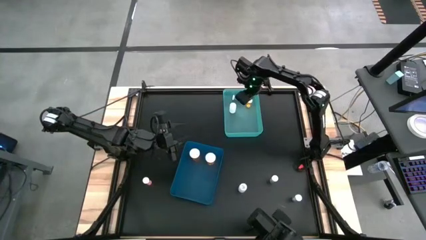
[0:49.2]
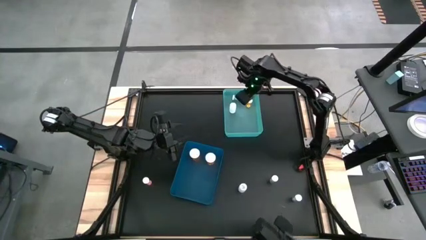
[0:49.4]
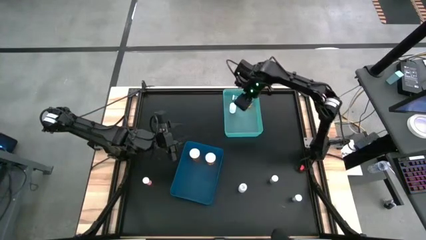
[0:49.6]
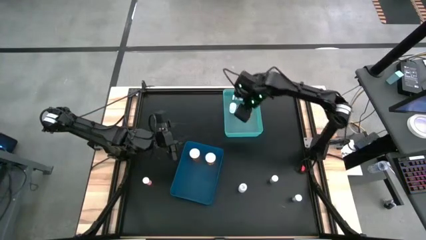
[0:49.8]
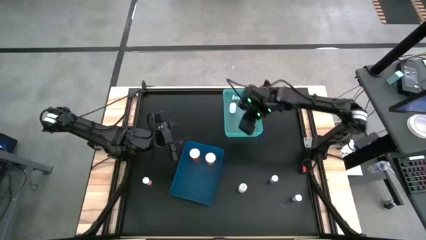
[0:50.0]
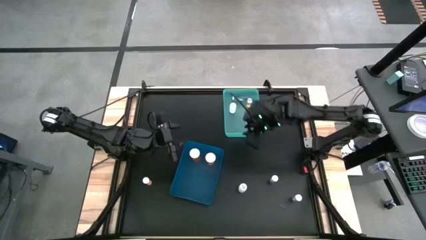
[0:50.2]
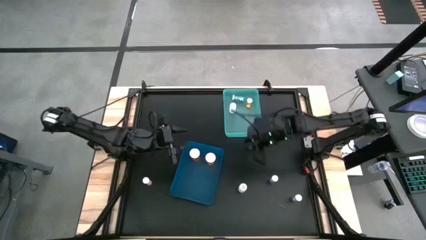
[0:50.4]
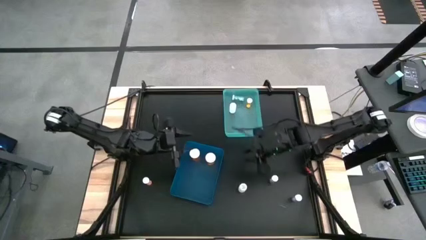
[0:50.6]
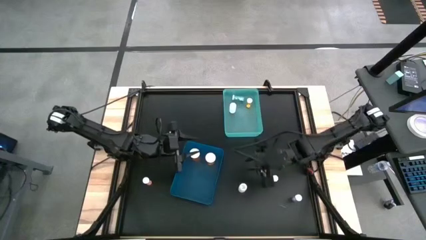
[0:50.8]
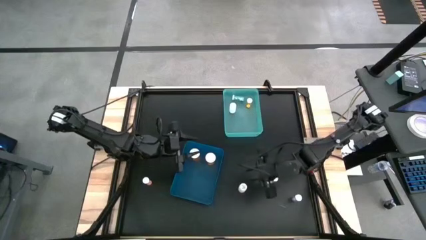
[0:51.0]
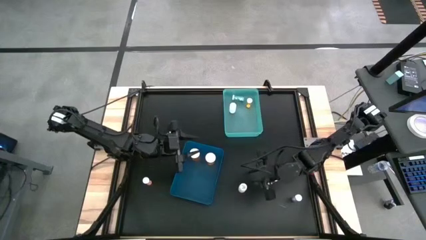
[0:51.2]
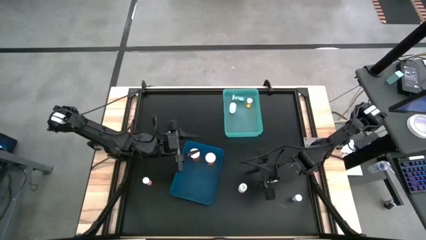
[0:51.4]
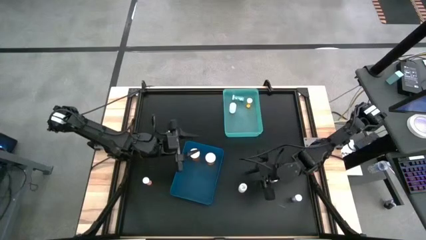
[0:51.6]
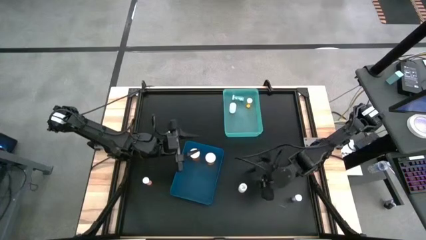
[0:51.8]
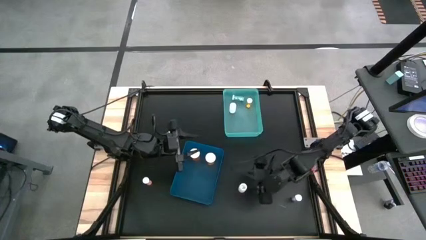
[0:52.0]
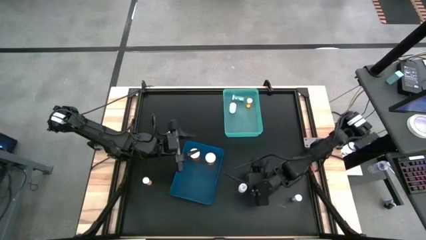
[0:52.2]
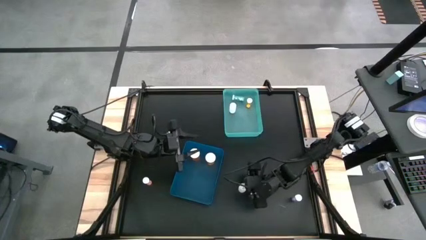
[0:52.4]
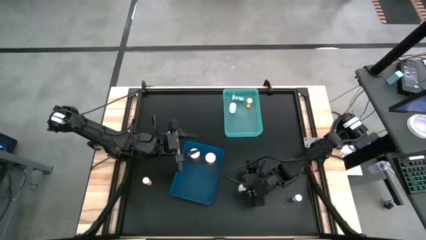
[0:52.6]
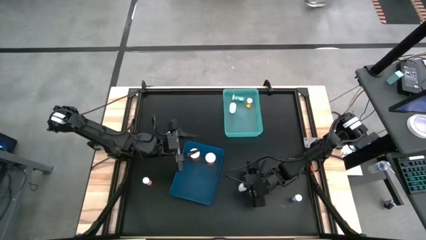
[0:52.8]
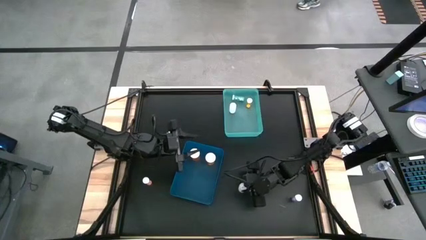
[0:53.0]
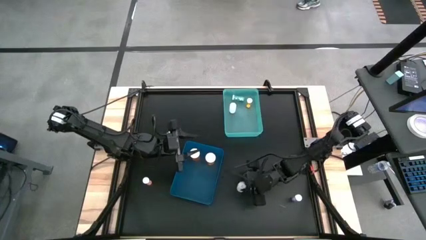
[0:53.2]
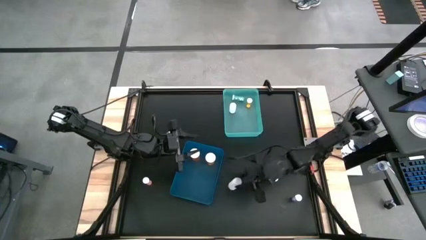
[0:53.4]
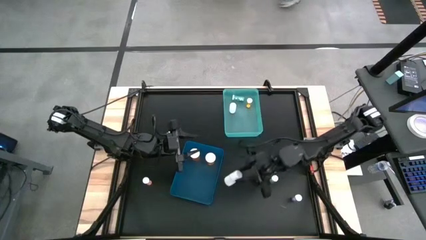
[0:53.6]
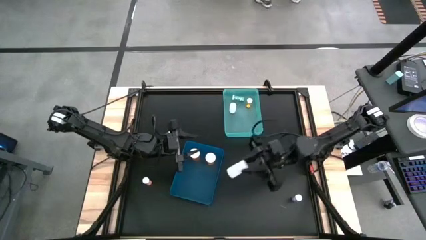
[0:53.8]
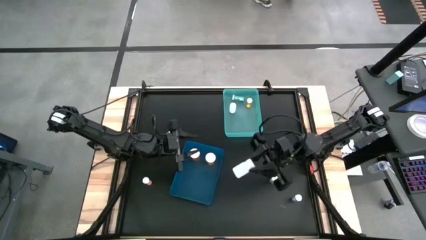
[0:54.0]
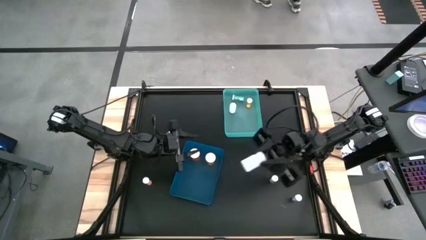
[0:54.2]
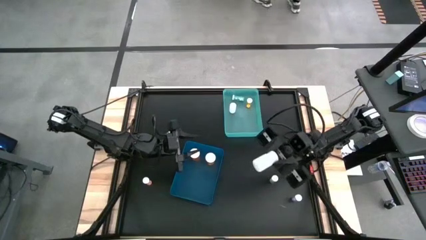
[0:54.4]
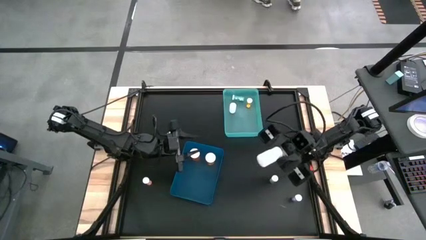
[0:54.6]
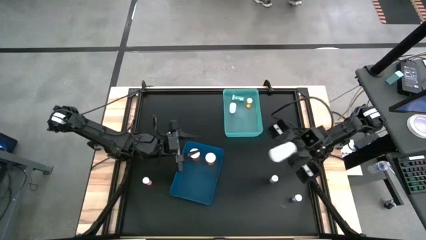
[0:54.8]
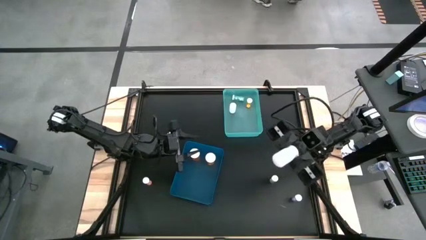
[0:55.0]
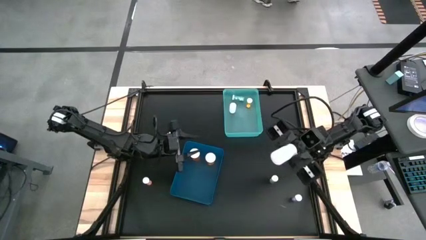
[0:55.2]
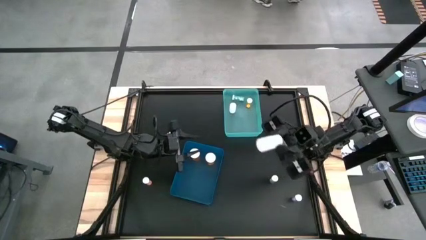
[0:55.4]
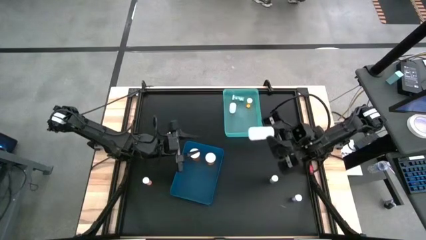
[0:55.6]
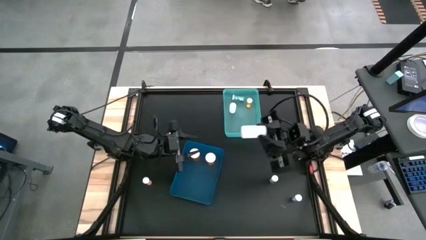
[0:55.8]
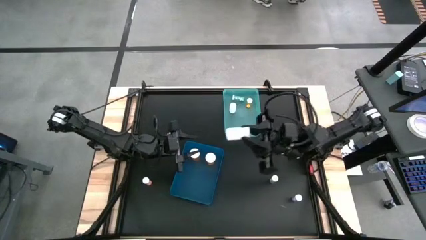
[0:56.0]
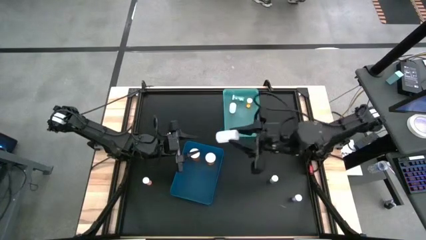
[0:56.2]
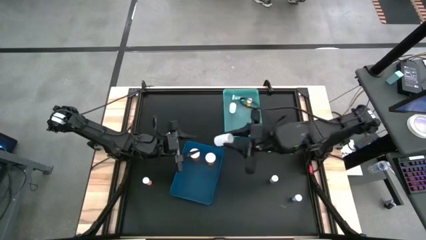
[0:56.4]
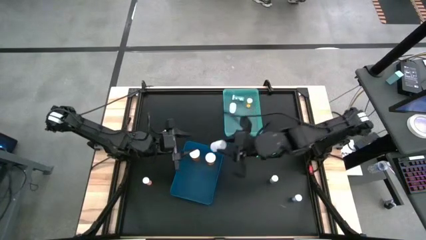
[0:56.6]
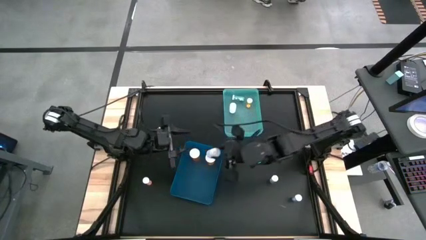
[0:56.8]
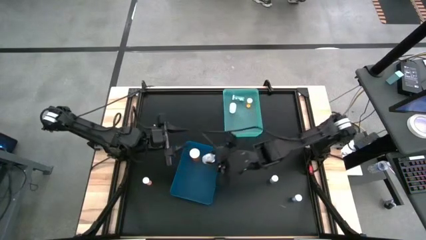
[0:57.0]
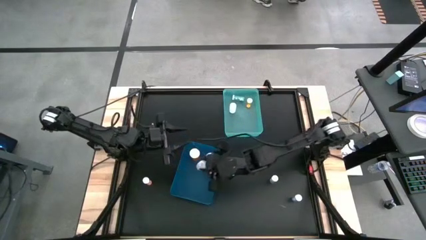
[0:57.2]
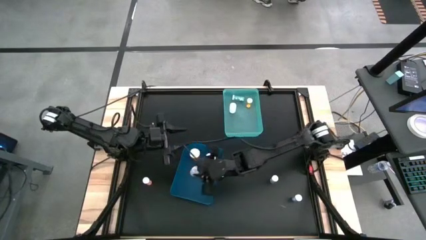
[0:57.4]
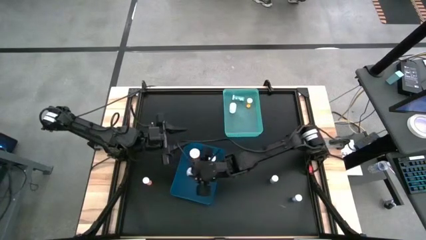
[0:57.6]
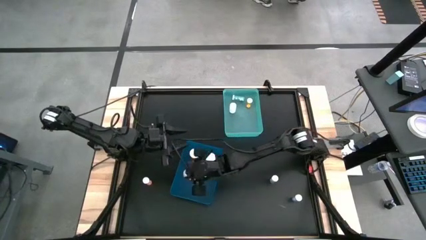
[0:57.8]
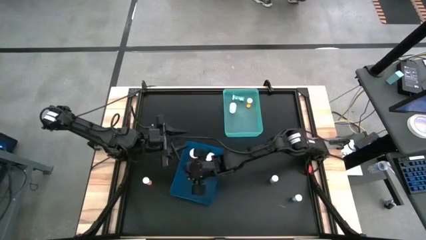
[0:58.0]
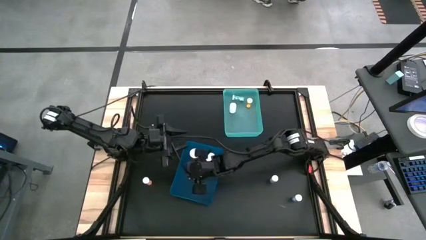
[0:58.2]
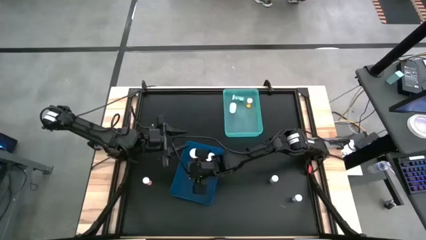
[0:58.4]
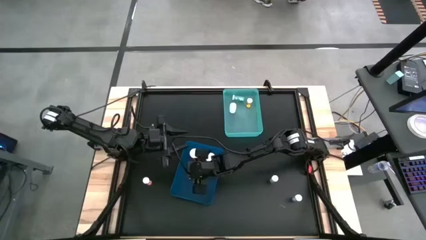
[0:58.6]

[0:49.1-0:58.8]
Task: Pick and place medicine bottles into bin by pill shape (circle, oval)
Put the white capsule bottle into the blue bin

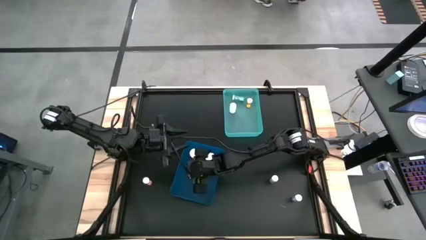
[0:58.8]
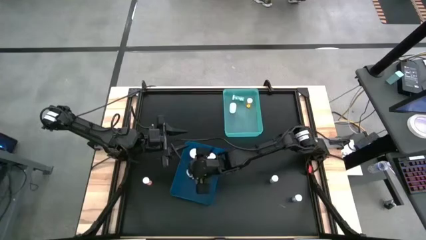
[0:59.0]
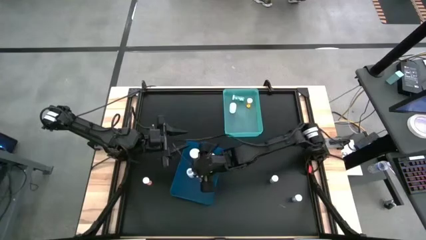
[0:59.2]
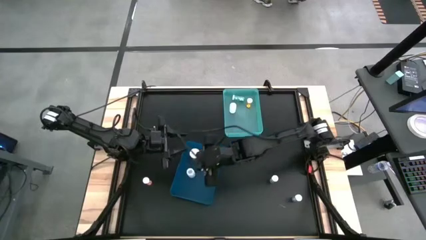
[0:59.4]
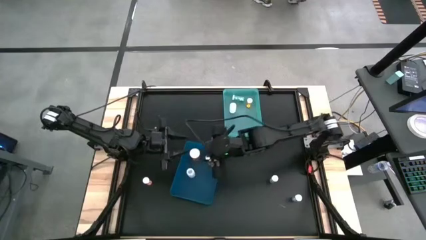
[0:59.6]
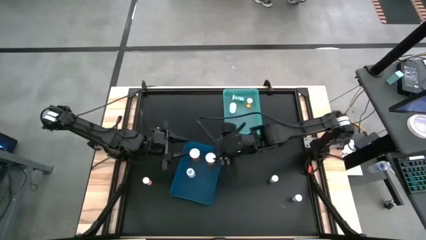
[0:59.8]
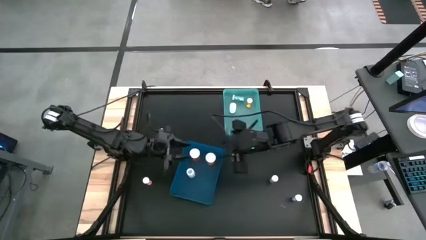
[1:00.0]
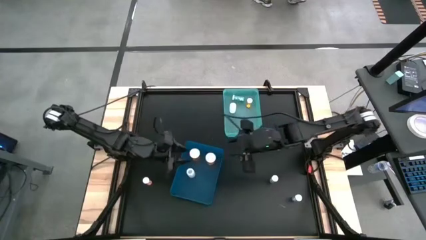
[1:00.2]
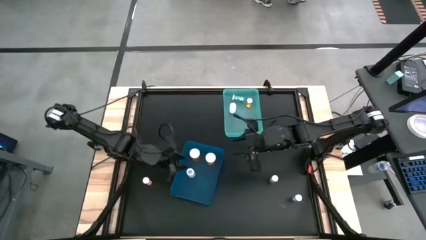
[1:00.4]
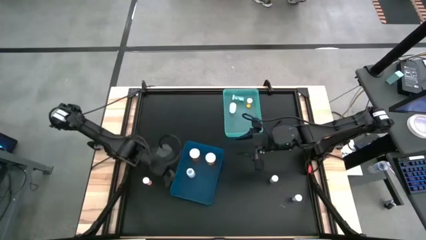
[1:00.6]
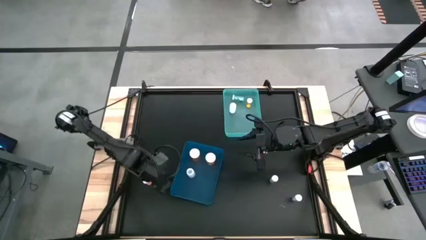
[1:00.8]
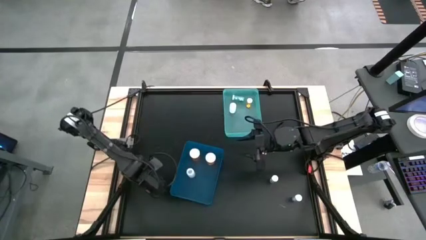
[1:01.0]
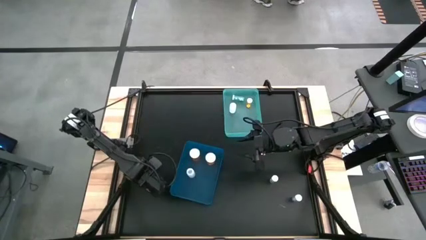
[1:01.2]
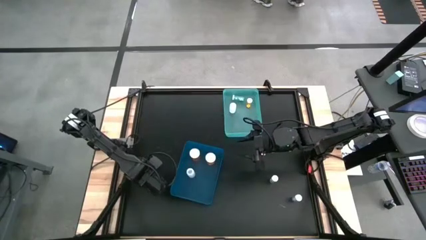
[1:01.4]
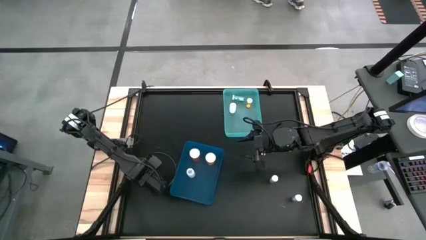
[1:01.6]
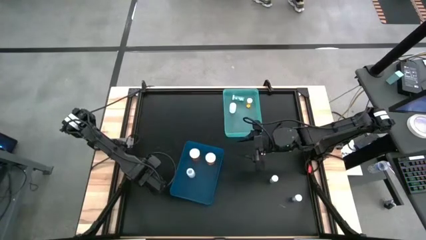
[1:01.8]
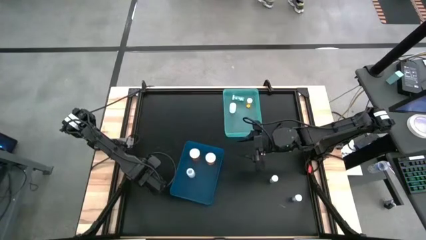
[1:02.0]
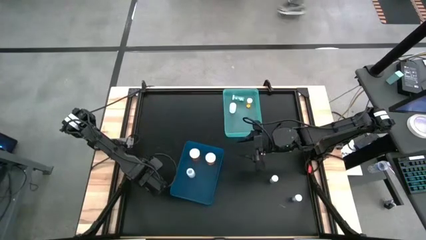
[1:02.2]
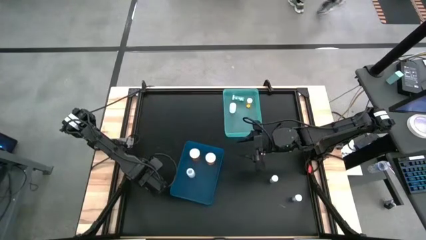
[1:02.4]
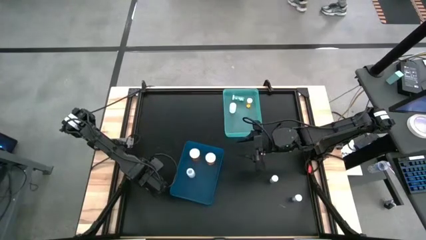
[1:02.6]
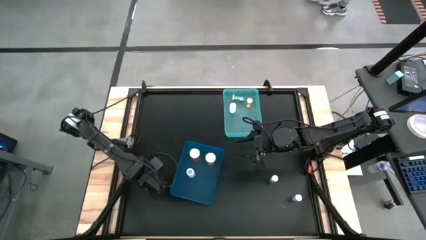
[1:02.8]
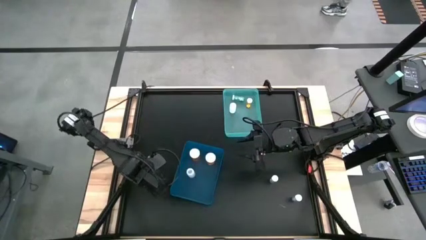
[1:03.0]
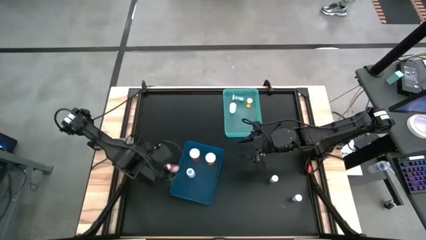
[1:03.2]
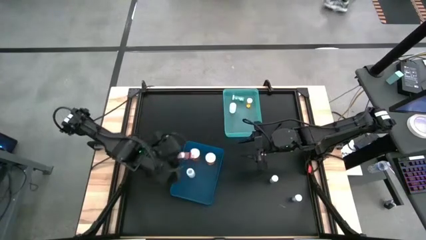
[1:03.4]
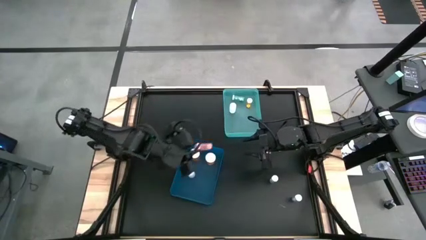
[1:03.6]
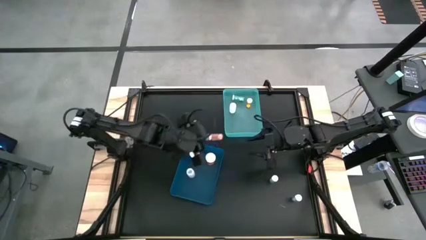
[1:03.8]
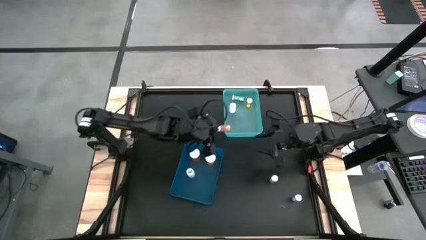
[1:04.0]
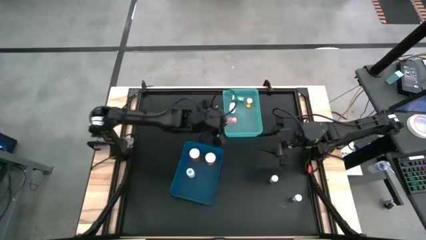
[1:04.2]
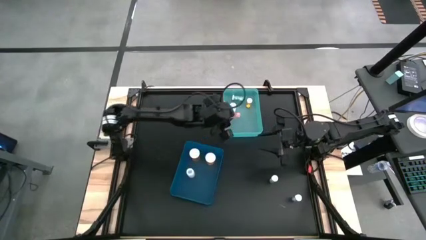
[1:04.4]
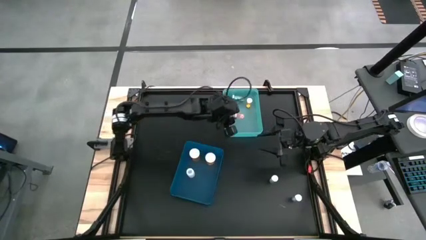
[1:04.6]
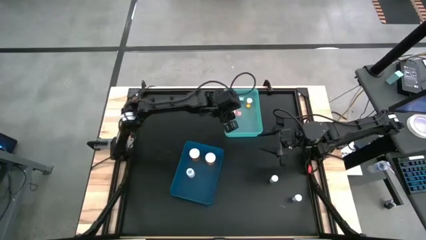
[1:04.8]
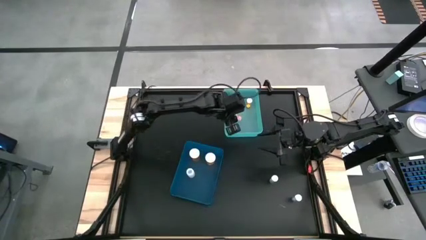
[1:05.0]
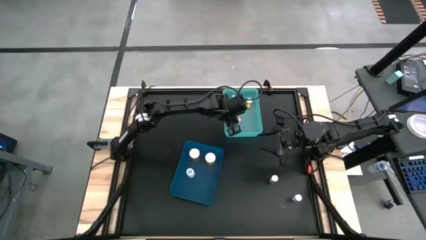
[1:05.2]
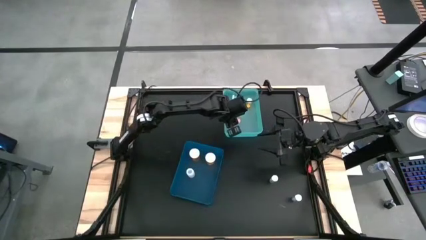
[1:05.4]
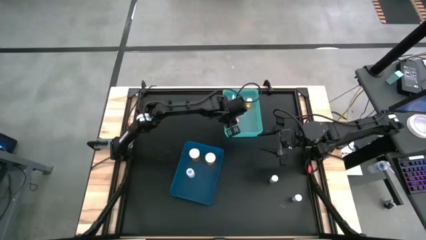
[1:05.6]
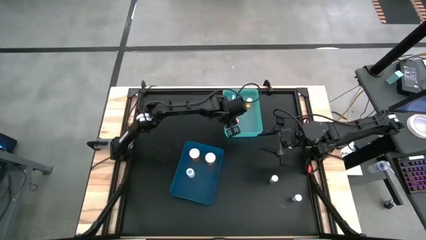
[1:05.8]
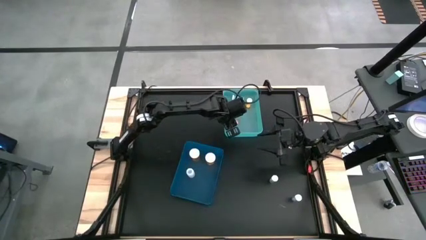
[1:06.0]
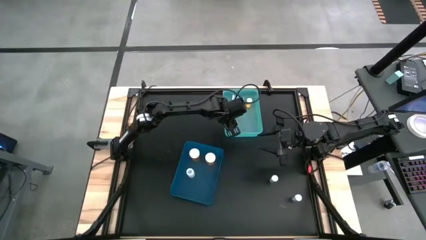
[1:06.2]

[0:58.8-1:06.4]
Put the red tablet bottle into the green bin
